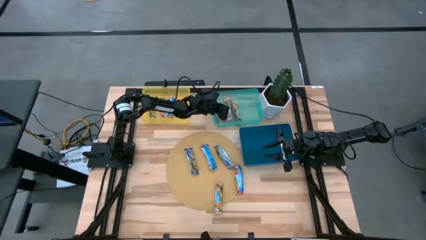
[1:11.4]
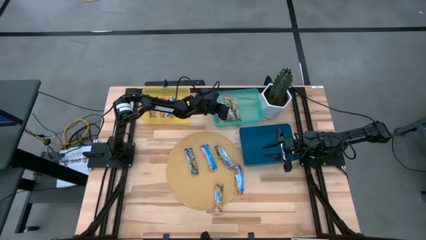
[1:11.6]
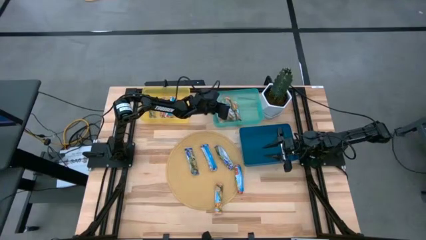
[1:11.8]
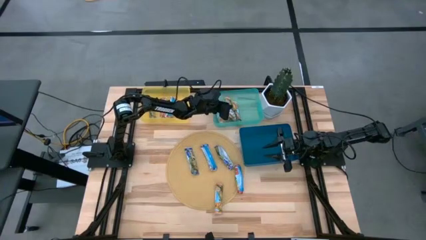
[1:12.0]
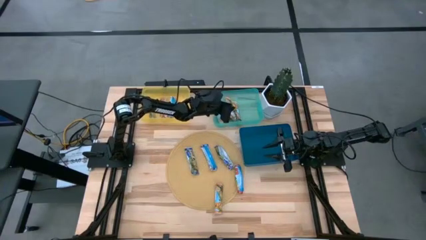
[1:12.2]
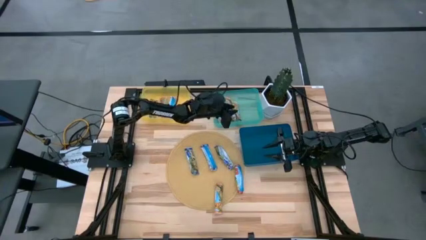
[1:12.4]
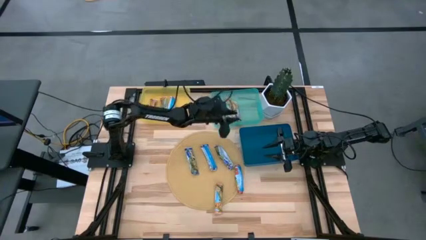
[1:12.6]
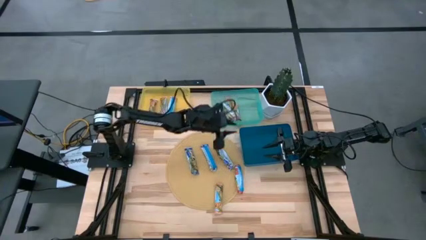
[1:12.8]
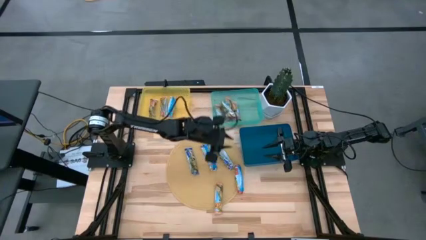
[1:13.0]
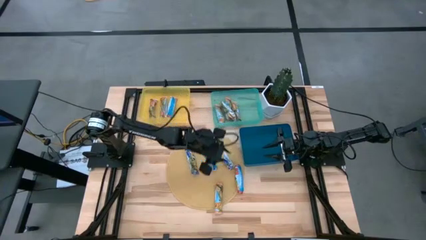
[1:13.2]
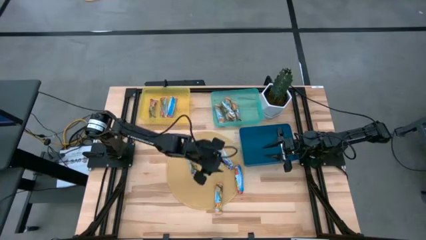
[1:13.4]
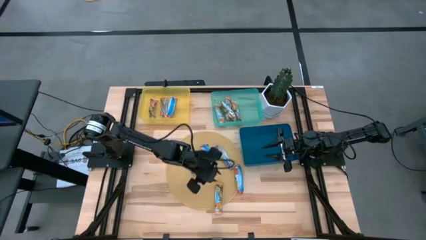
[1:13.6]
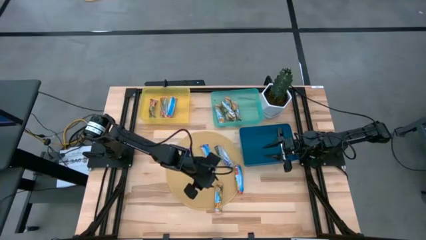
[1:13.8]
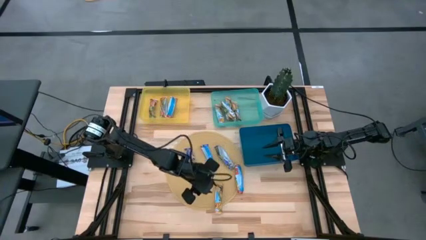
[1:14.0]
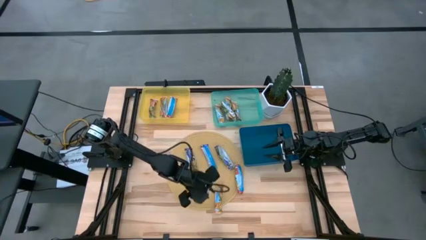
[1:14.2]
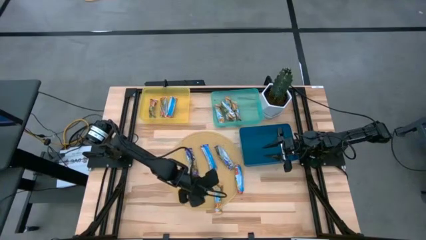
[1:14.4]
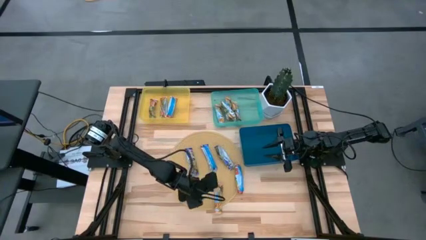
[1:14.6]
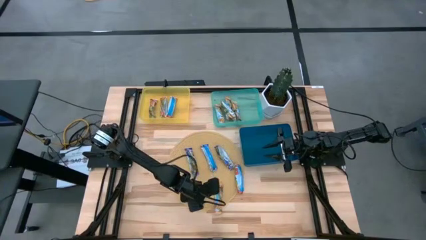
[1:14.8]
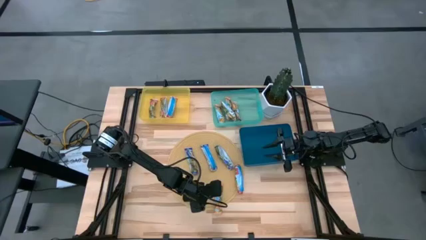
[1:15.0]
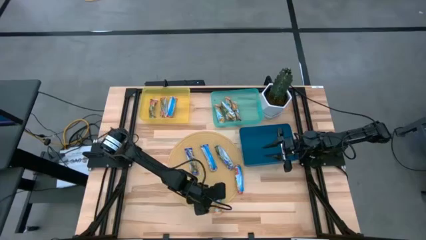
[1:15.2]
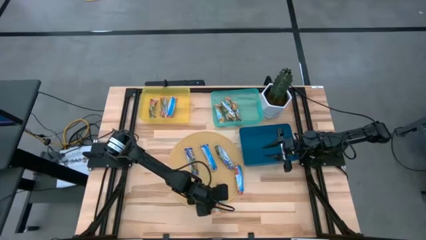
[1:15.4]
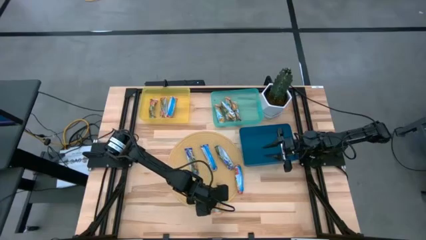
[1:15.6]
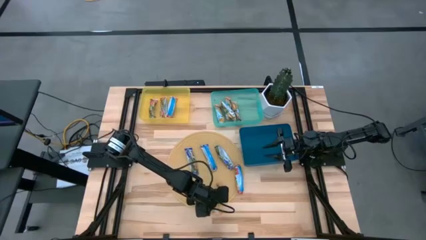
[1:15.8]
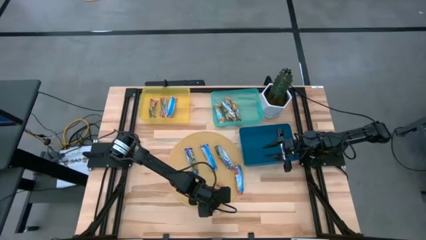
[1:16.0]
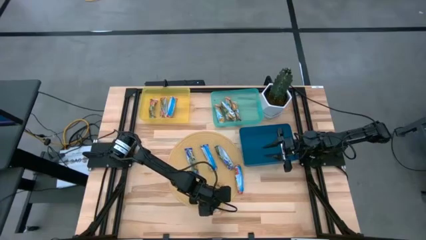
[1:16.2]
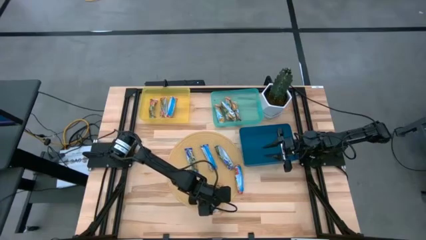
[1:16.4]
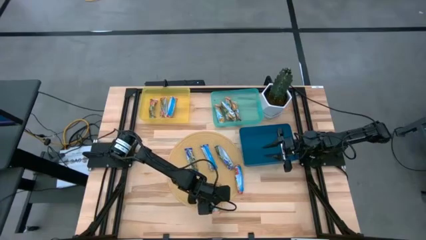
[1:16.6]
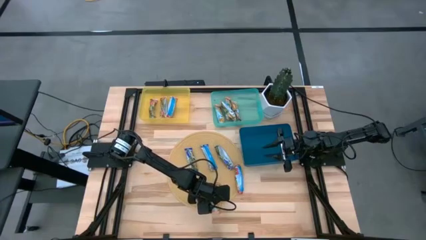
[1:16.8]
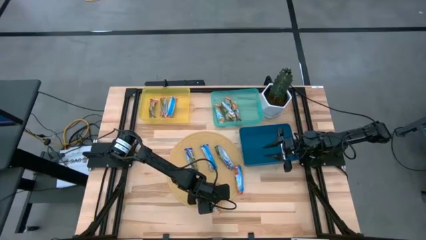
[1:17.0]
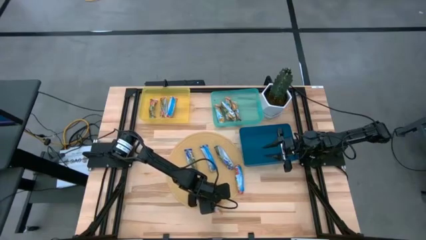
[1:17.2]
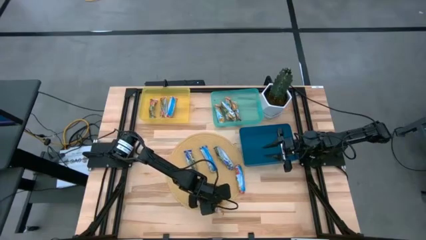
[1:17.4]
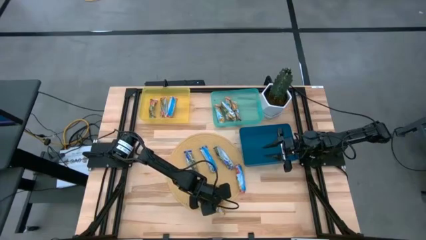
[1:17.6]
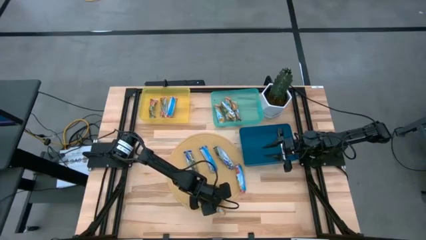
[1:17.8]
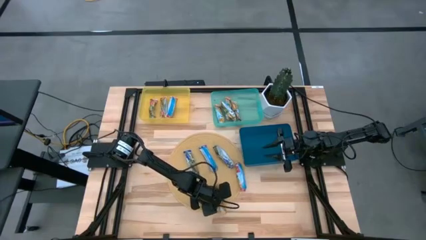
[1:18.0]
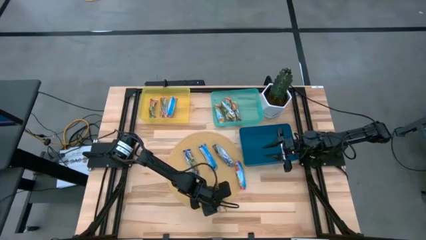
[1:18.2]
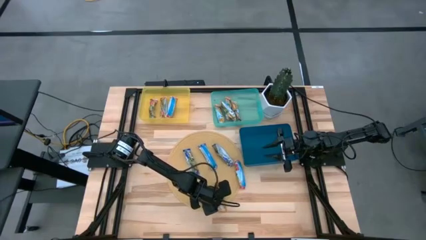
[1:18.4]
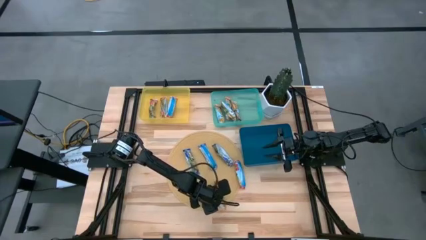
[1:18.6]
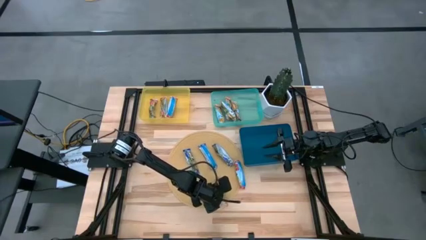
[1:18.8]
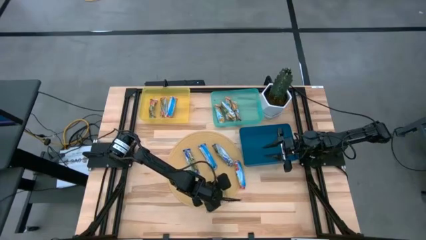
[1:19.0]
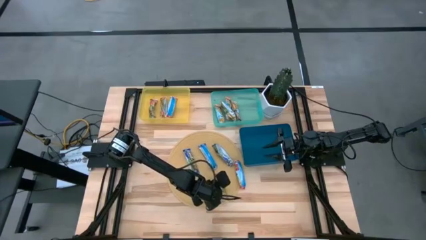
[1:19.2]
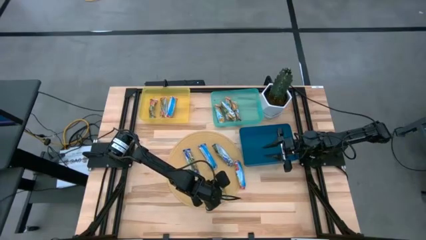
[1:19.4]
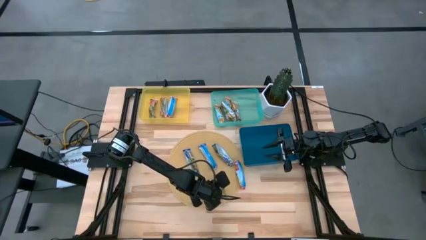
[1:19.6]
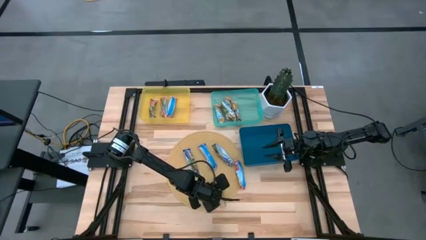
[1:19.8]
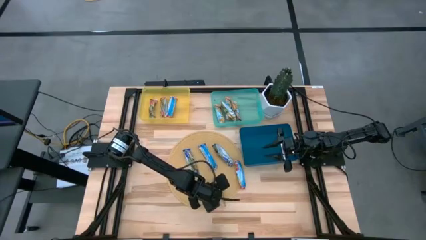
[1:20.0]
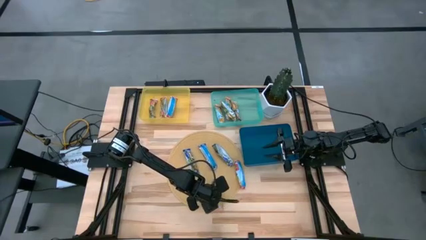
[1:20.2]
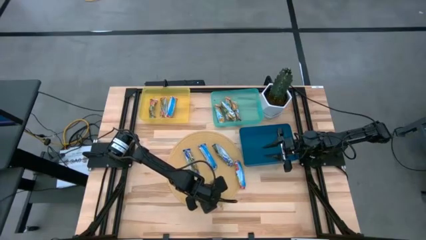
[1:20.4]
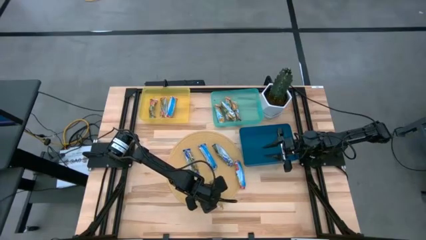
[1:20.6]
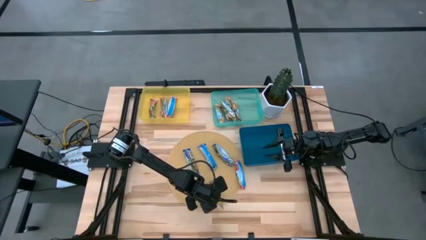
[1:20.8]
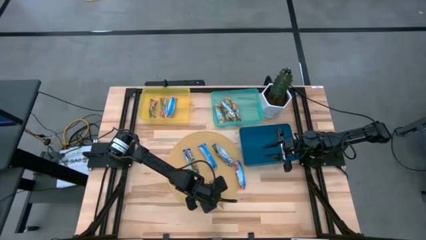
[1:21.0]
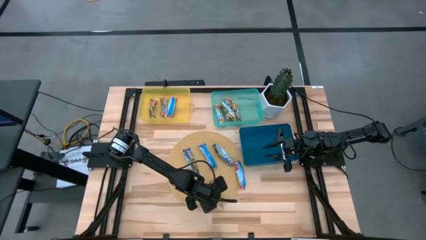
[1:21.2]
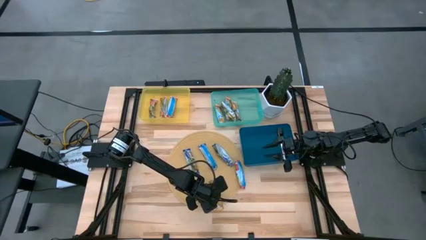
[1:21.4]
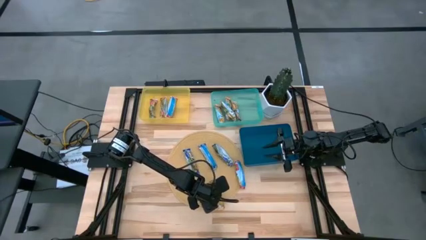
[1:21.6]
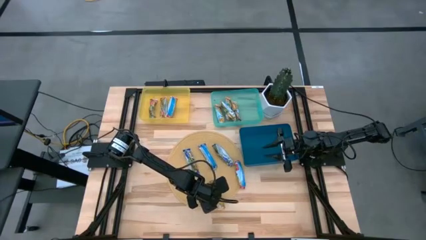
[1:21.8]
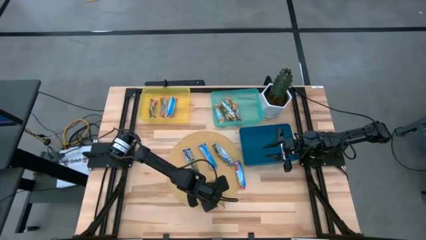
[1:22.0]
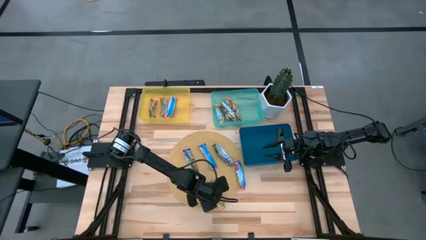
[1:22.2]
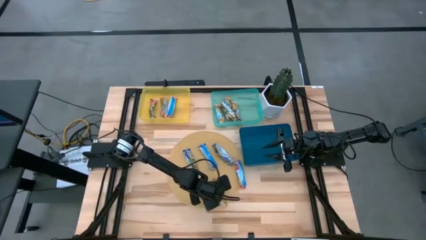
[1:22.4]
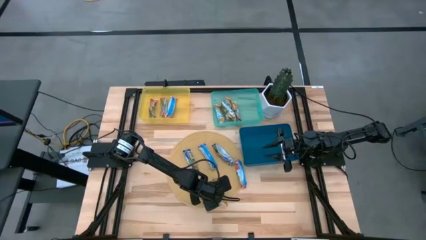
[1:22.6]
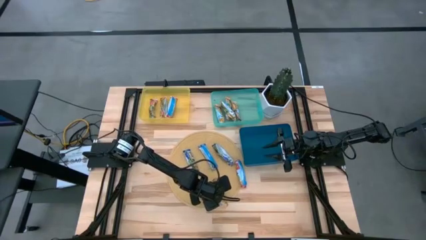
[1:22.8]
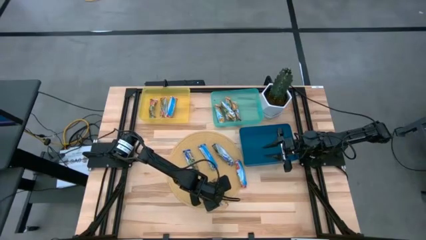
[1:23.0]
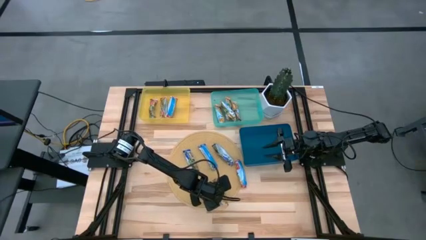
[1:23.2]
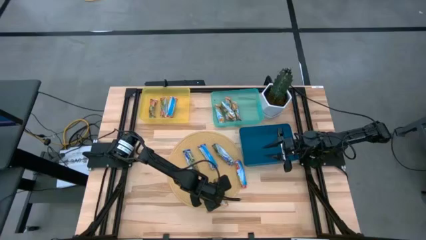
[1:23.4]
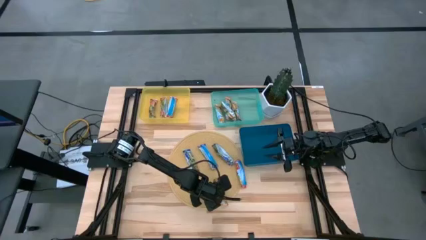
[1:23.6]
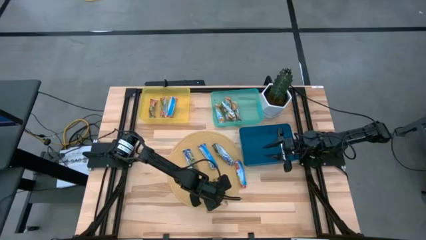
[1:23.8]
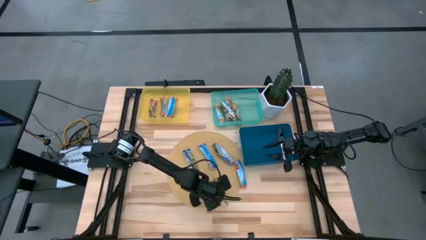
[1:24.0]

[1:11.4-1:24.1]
Task: Pick and place Granola Bars by type
Put the orange granola bar into the green bin

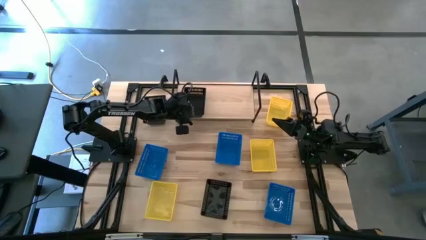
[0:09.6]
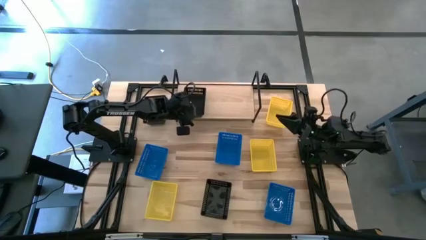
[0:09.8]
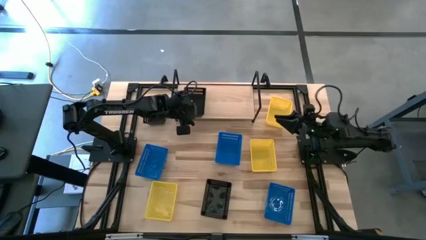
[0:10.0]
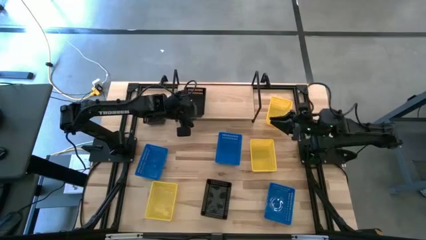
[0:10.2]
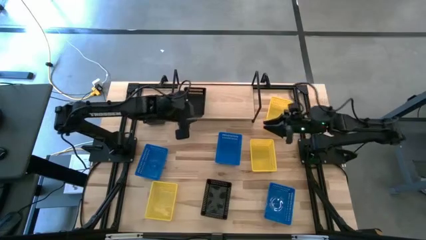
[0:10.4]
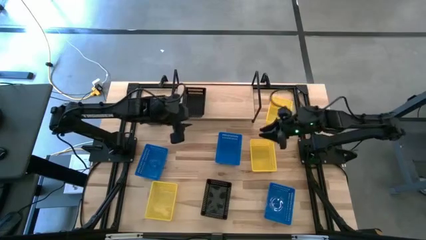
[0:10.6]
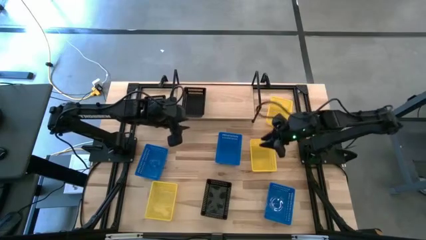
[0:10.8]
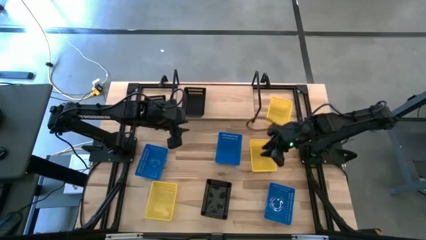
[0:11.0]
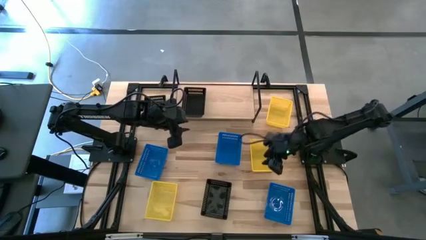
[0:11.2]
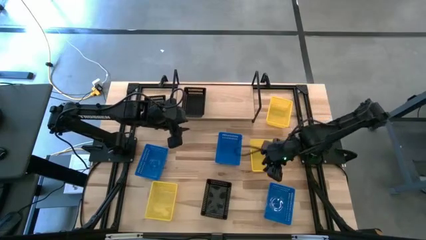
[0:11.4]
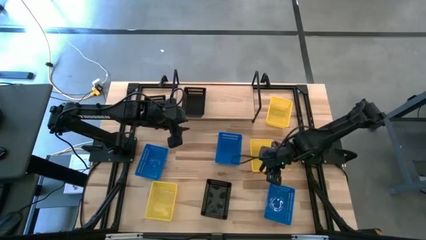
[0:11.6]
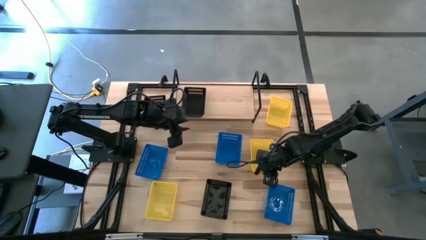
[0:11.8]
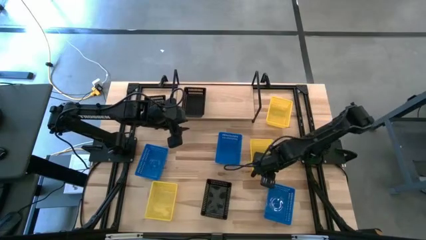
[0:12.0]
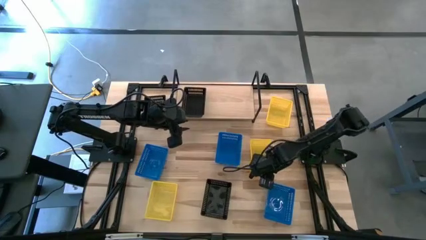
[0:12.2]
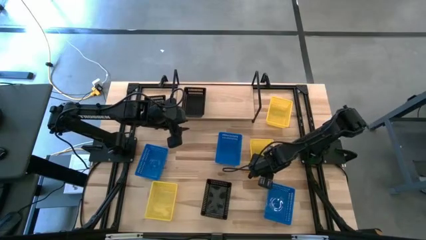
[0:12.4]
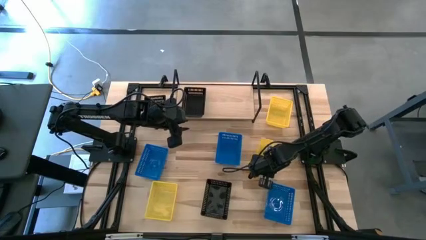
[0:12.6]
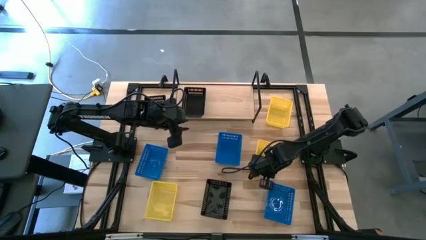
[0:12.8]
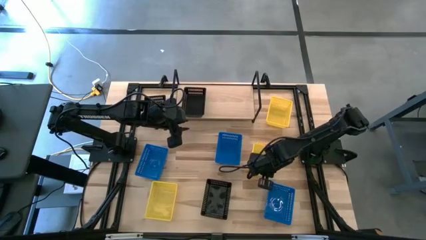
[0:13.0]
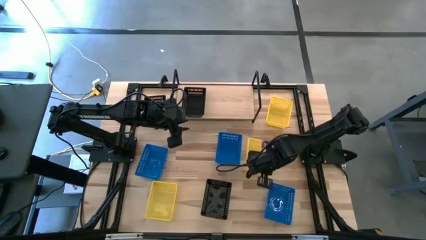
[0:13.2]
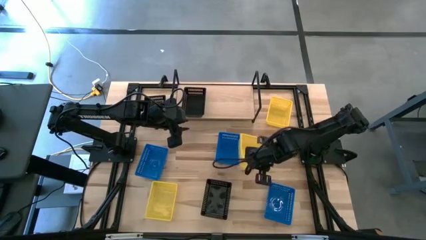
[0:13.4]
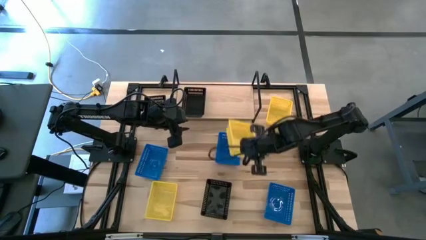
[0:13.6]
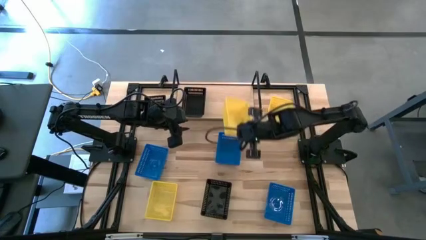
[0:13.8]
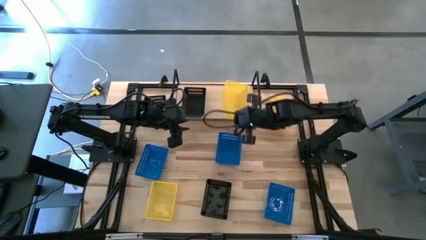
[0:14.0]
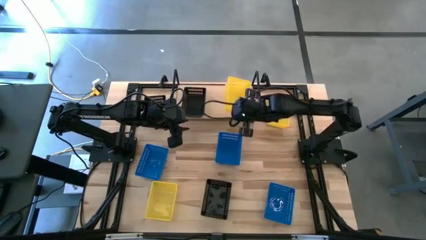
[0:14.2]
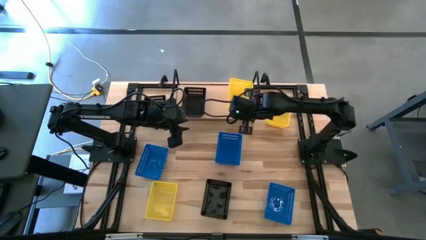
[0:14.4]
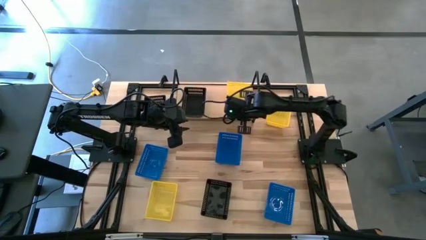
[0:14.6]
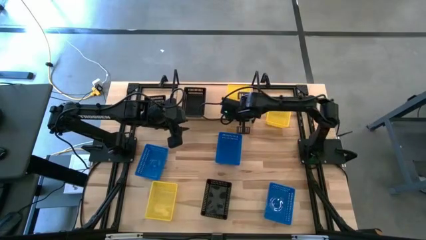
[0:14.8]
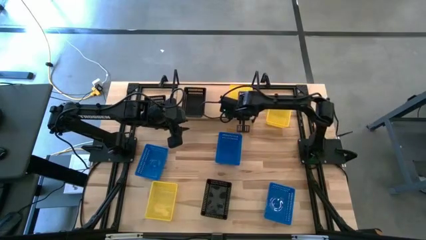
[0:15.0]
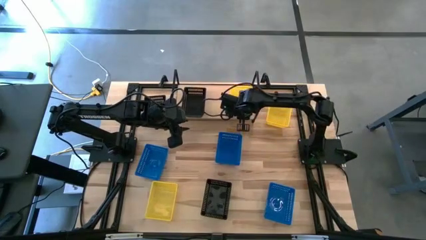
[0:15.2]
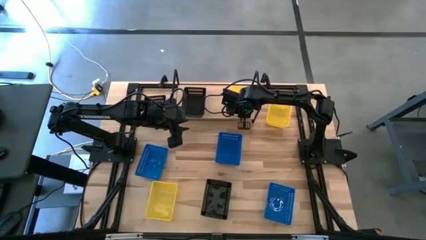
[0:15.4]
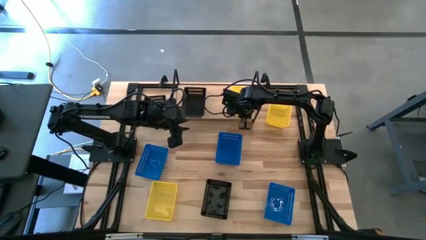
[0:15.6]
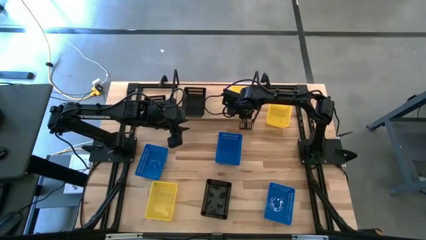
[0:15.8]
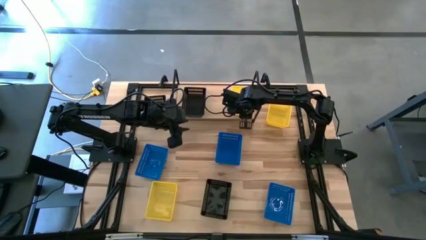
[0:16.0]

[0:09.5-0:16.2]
Task: Stack baskets on shelf by color
Put the center yellow bin on the shelf
